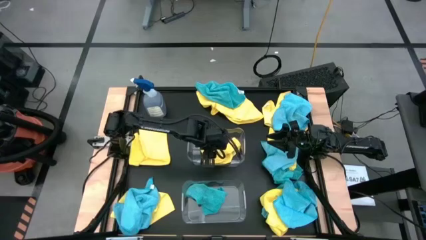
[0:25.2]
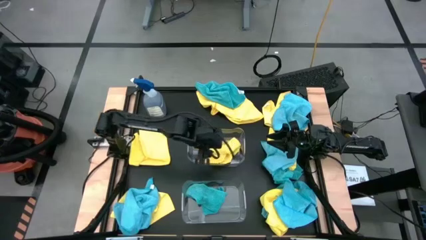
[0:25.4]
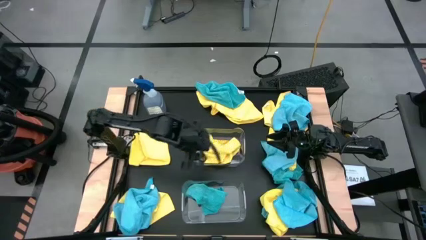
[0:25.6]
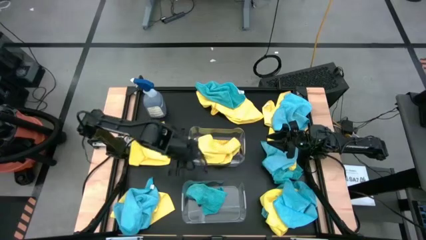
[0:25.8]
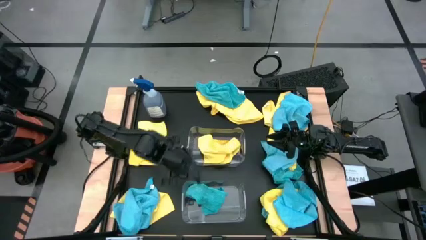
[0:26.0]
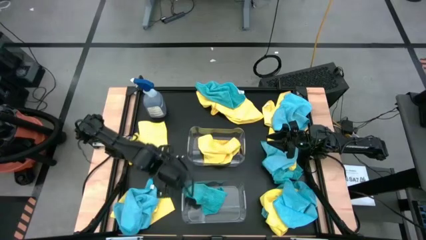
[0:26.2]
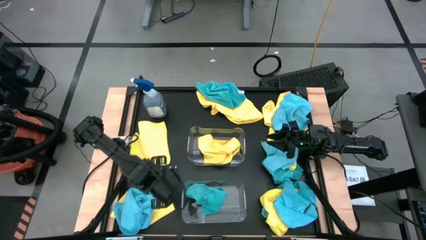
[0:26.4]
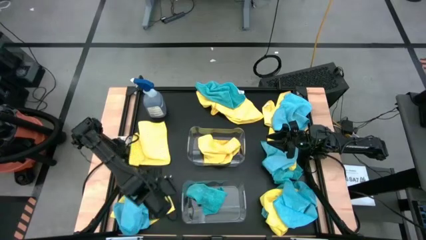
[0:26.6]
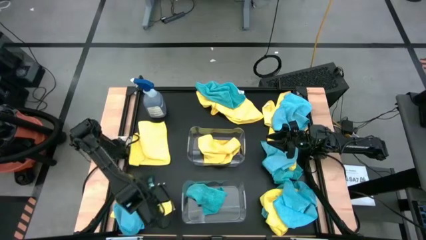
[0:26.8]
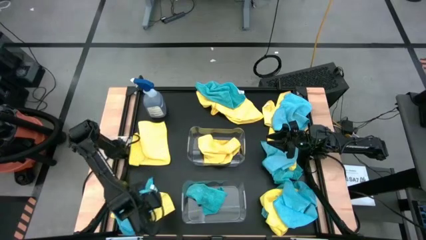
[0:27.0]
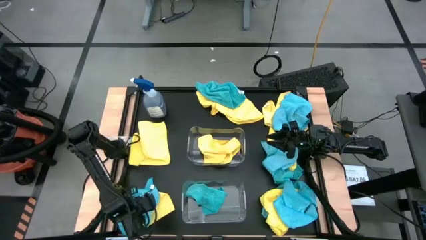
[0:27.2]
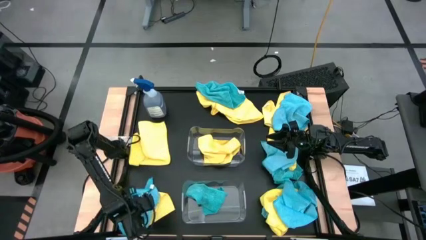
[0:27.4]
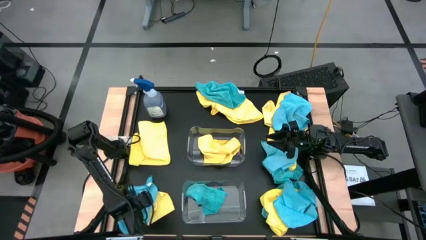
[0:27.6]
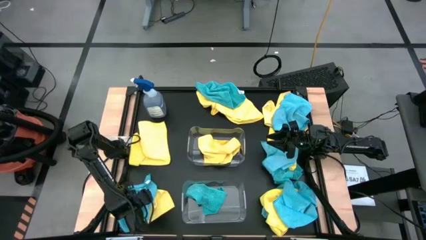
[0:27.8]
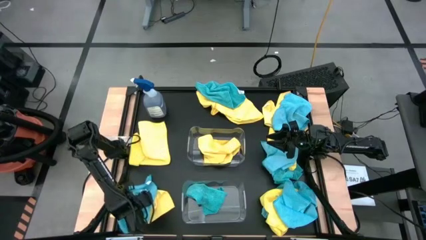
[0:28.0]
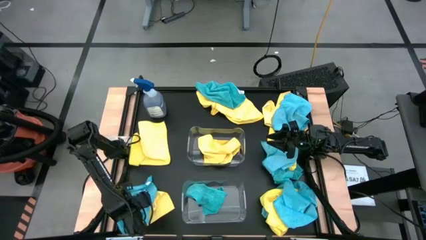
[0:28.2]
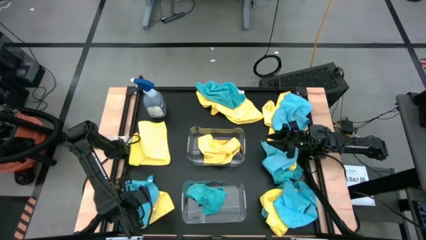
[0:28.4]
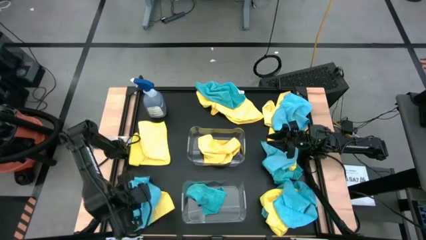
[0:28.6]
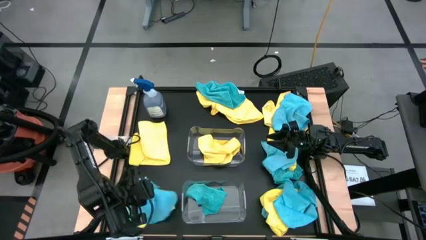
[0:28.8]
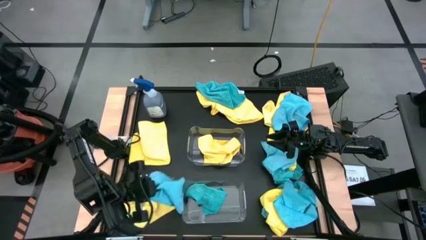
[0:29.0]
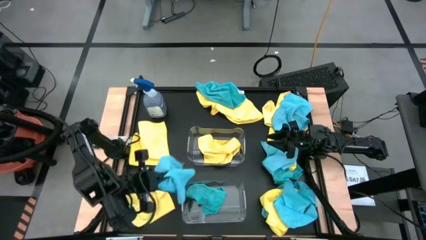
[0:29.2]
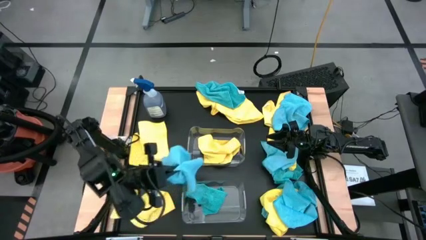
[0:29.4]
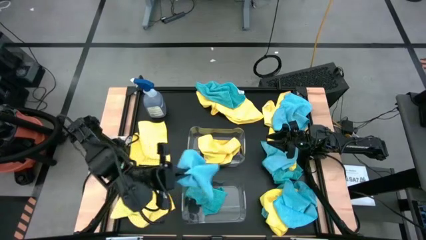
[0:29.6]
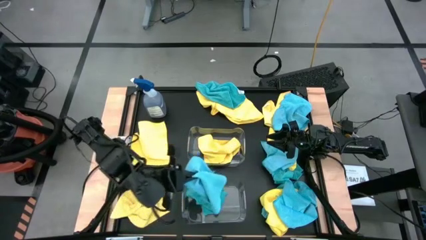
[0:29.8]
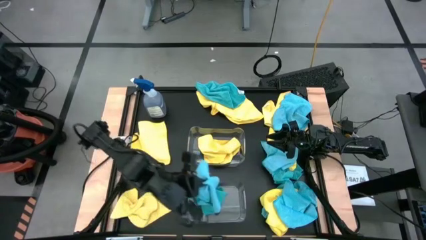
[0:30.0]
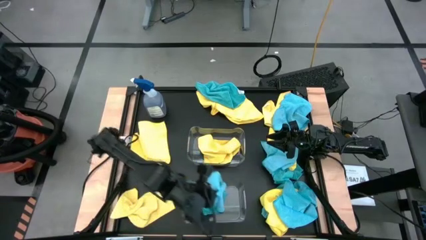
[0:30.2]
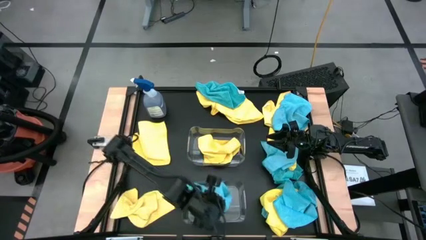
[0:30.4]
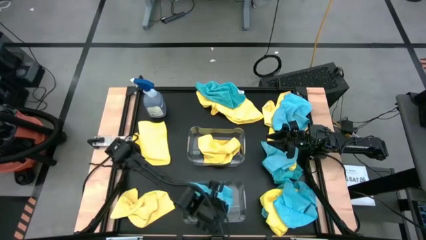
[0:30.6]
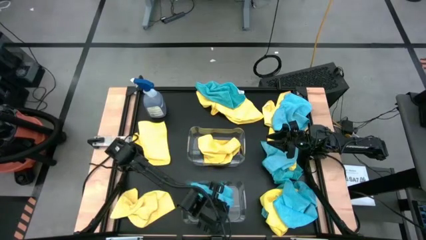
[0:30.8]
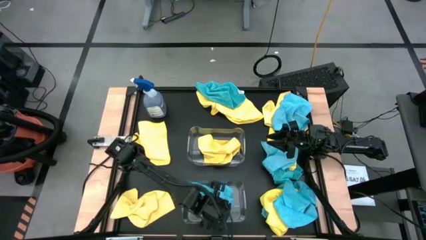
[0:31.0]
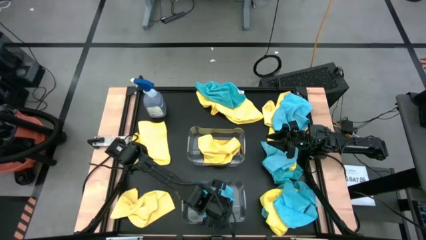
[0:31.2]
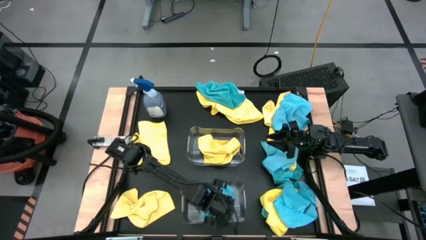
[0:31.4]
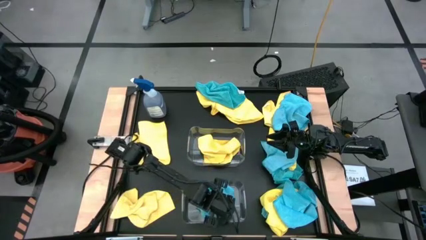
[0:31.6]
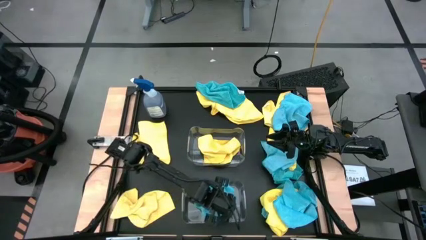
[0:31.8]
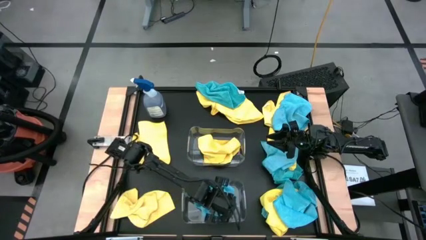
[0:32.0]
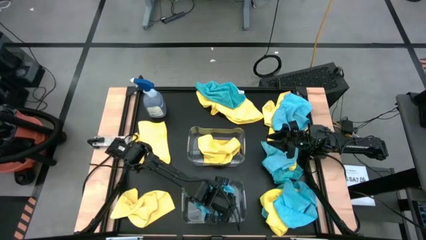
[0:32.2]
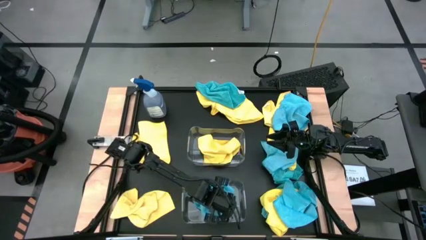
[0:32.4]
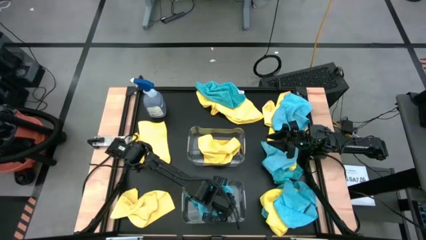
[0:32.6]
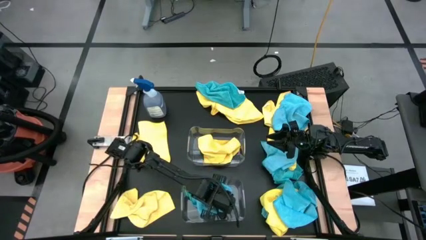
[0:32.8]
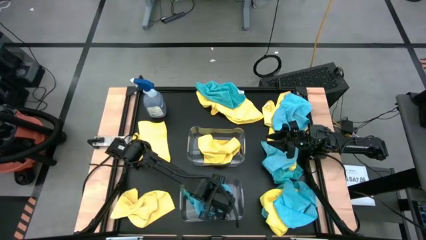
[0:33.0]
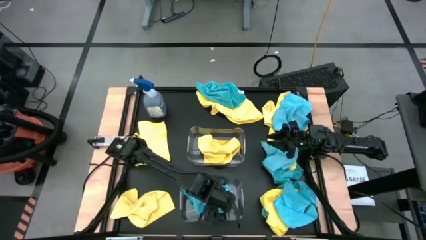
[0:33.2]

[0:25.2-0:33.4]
Task: Sort microfiber towel by color & place in baskets
Put the blue microfiber cloth into the bottom transparent bin

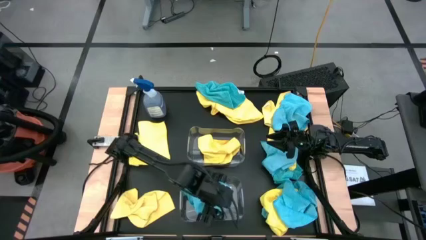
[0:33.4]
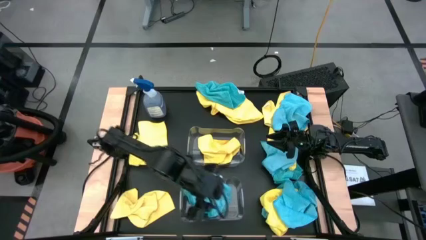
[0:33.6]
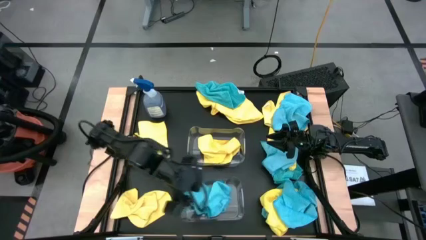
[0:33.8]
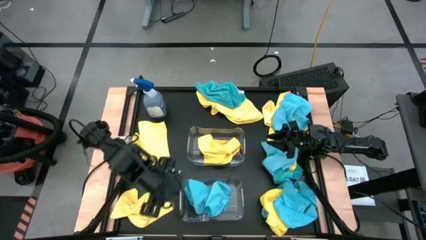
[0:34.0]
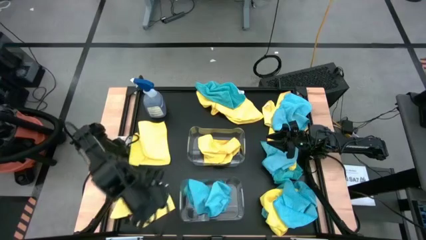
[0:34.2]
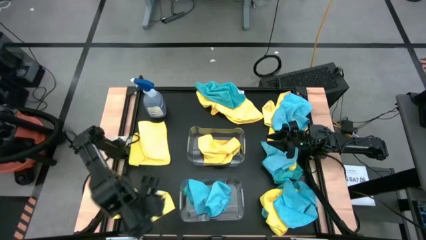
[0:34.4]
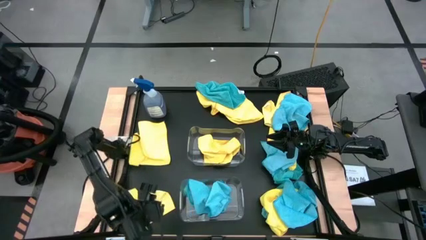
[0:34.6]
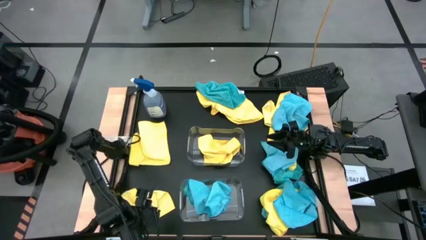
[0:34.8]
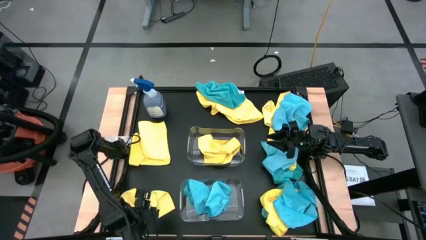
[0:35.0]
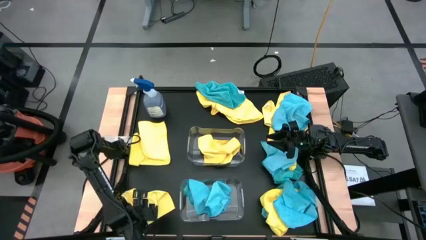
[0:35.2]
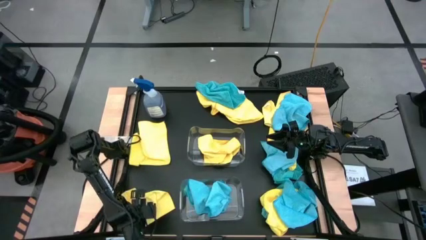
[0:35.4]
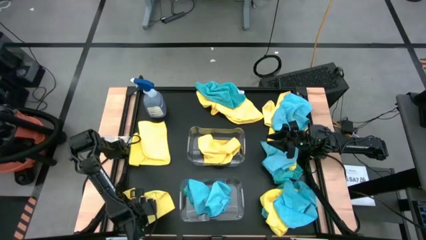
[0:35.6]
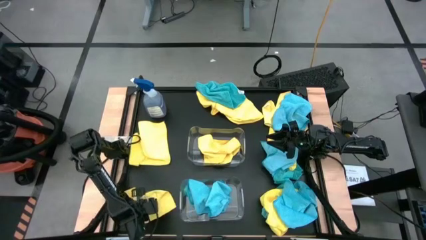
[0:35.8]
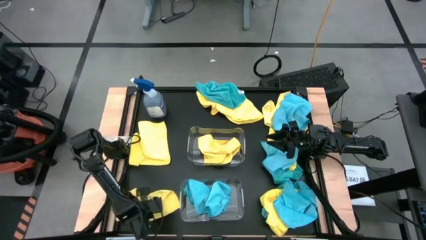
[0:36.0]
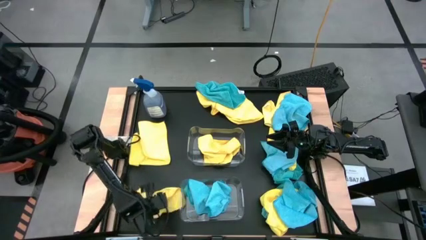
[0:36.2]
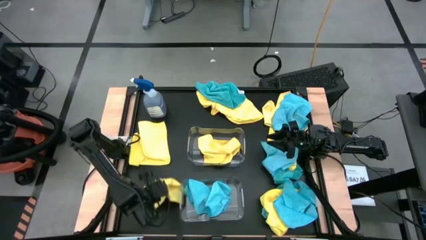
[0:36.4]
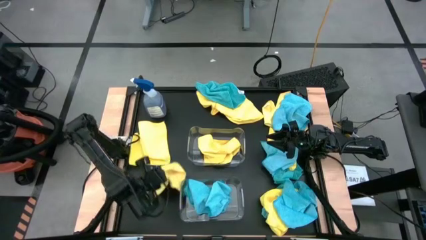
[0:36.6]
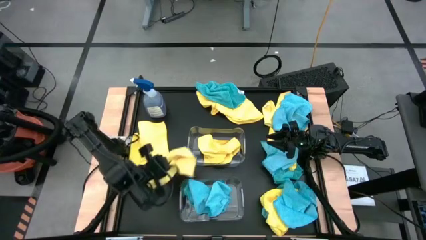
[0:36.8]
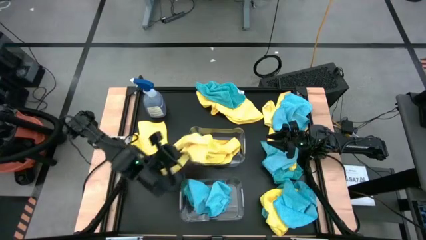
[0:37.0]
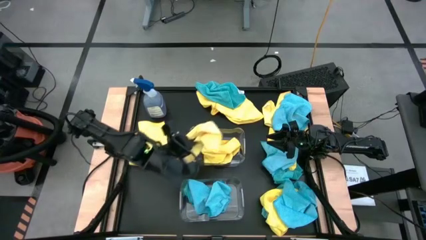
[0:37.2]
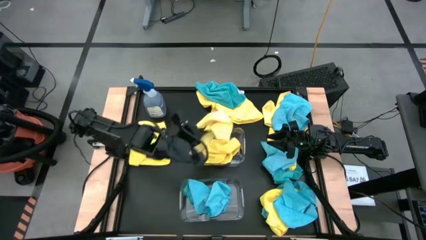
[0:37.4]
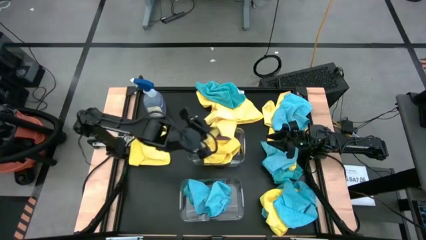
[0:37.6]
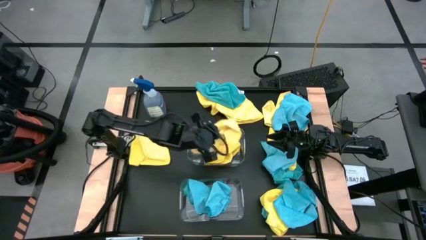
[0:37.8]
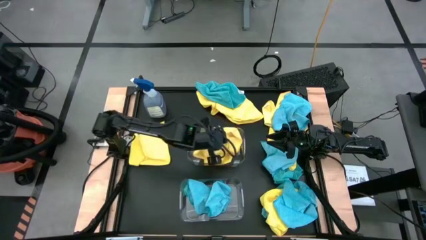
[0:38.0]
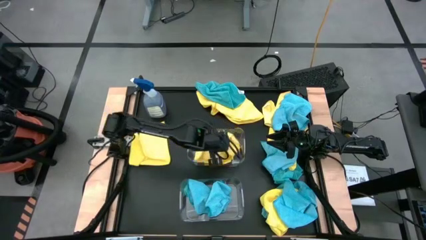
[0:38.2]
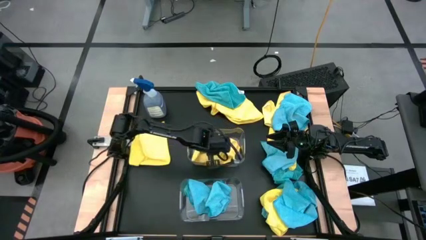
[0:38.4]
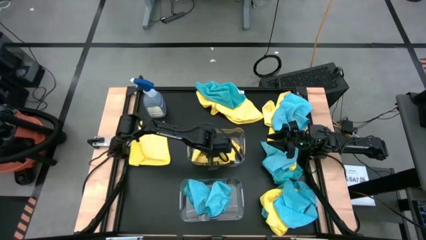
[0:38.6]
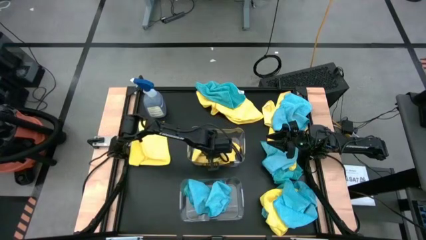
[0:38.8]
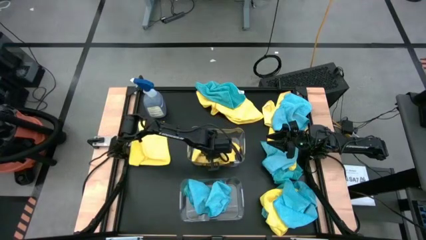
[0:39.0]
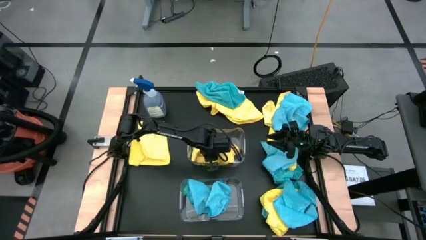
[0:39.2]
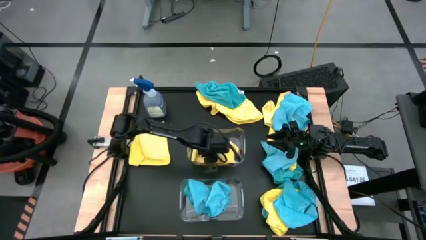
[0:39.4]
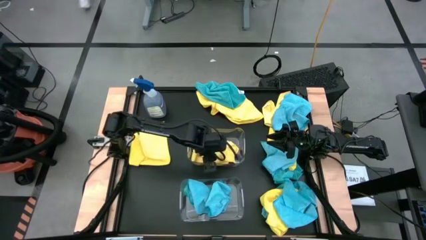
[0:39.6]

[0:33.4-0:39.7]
Put the yellow microfiber cloth into the top transparent bin

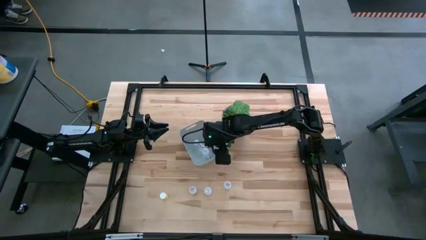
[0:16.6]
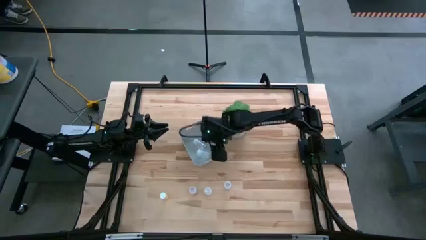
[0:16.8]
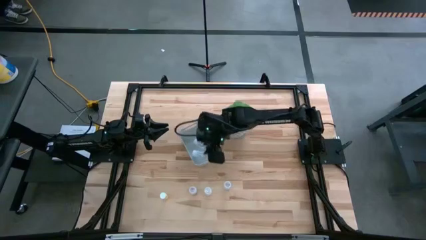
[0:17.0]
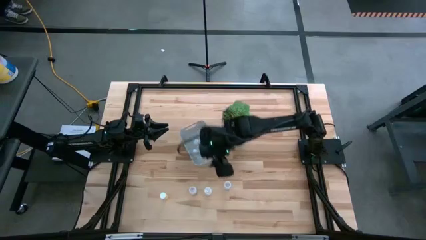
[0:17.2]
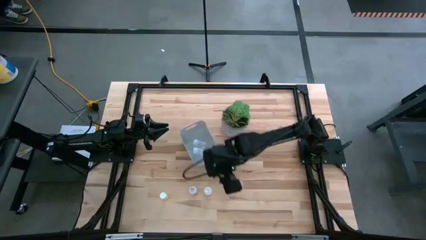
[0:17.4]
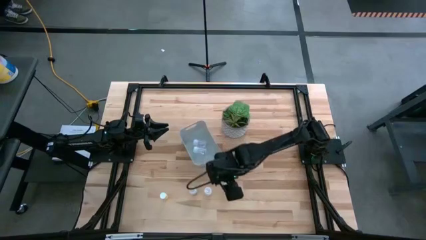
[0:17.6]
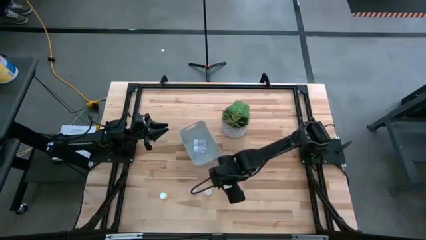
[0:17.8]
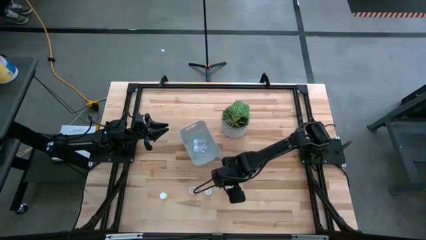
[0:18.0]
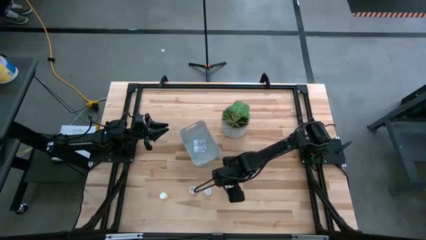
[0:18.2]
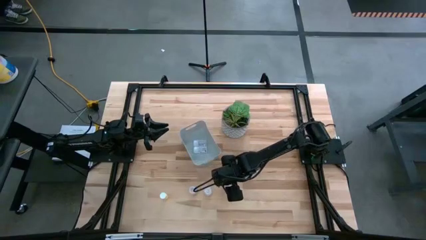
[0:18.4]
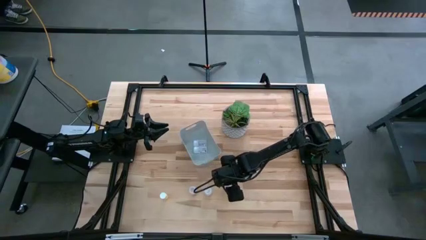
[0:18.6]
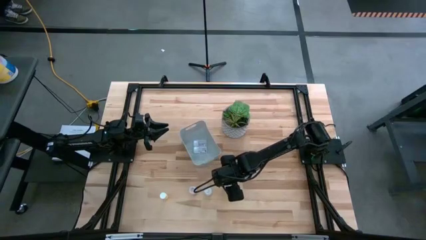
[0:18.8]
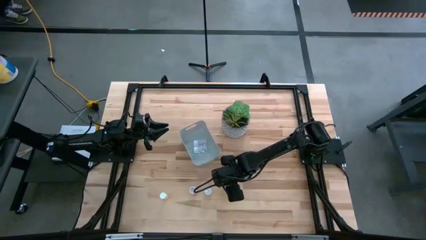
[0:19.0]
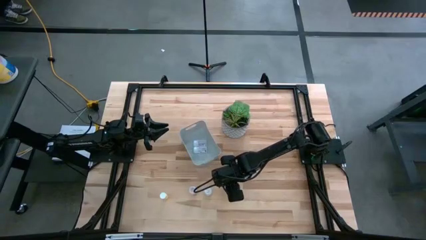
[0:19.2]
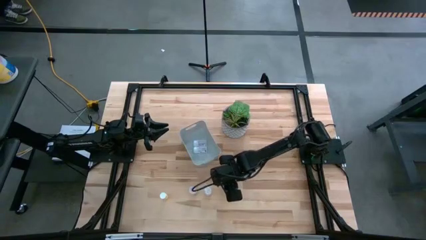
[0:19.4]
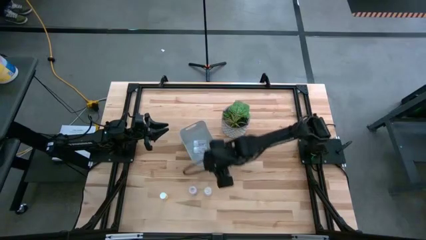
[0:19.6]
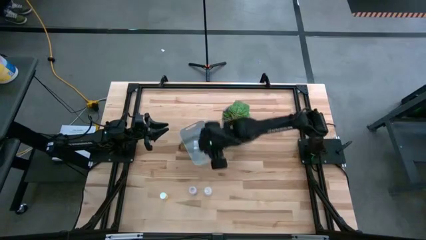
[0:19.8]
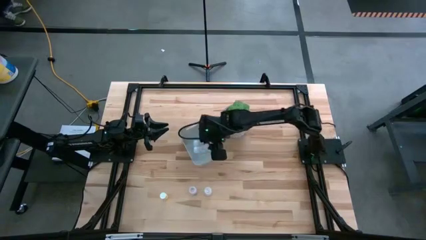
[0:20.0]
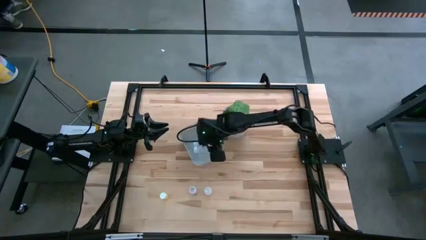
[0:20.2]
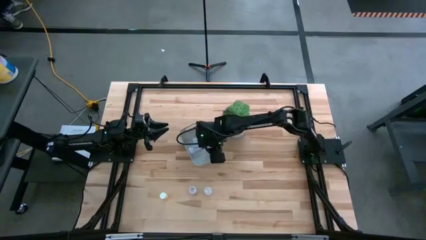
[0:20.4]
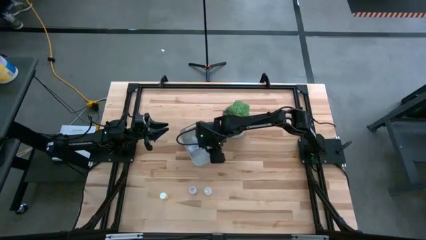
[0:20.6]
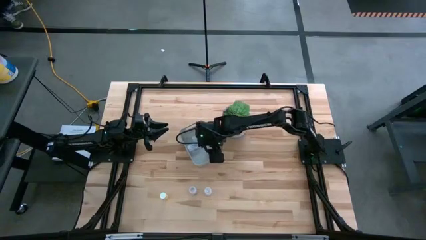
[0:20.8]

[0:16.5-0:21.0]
Task: Pick and place pill bottles into a basket
Put the transparent pill bottle into the white bin
